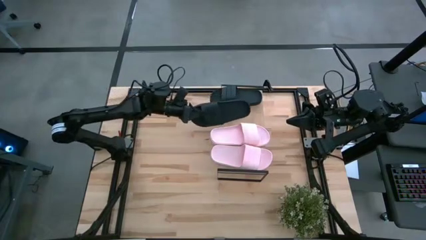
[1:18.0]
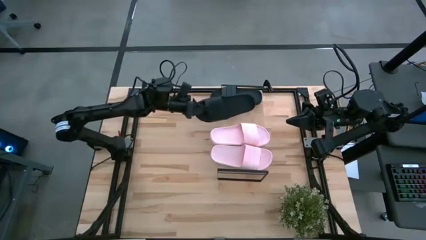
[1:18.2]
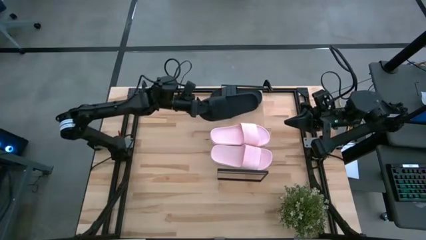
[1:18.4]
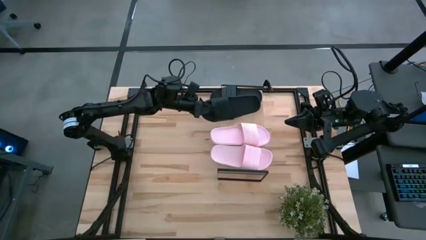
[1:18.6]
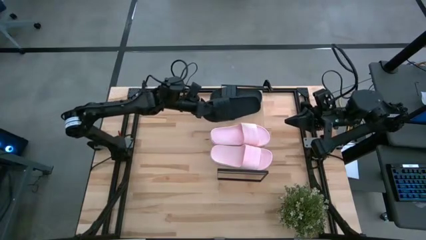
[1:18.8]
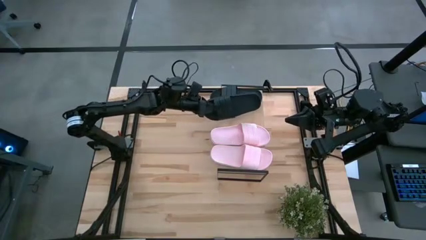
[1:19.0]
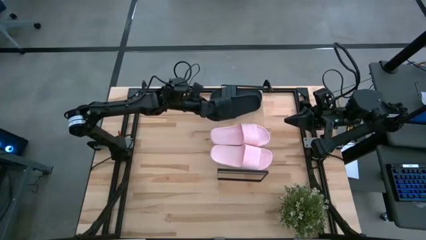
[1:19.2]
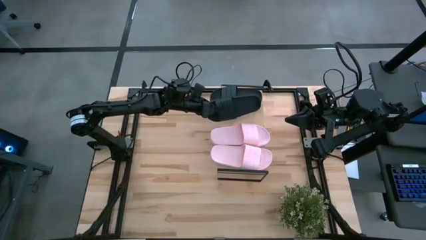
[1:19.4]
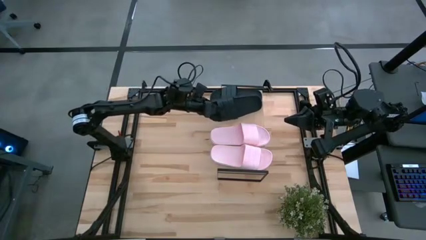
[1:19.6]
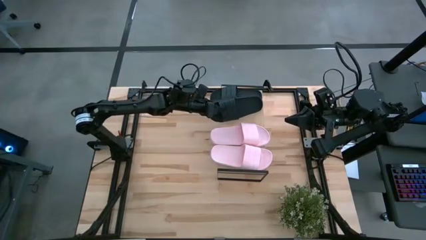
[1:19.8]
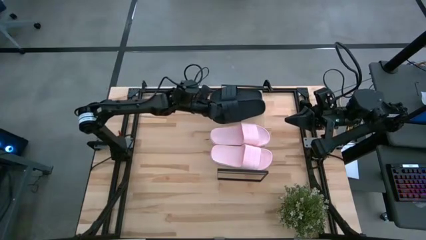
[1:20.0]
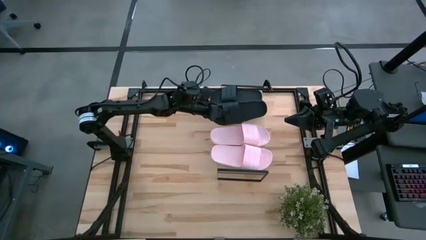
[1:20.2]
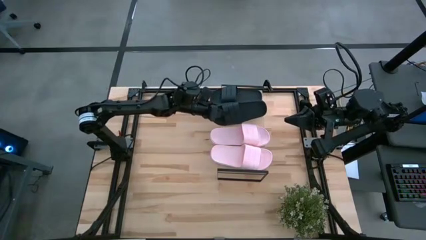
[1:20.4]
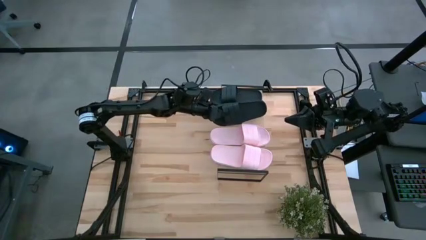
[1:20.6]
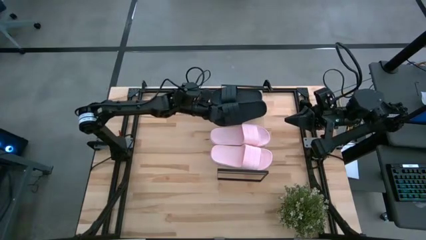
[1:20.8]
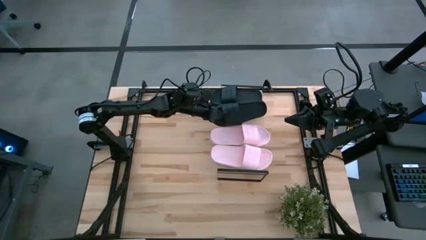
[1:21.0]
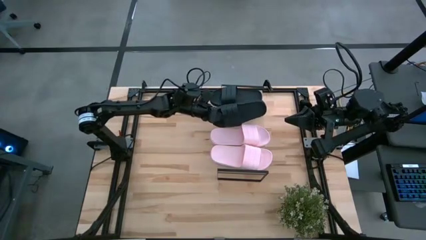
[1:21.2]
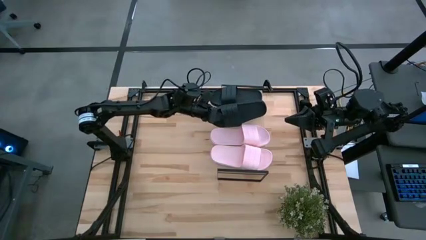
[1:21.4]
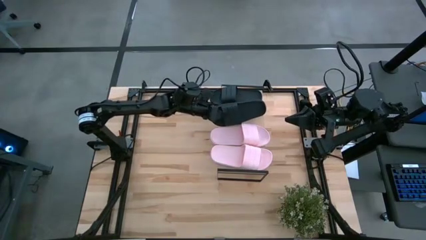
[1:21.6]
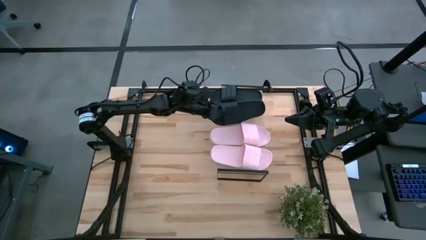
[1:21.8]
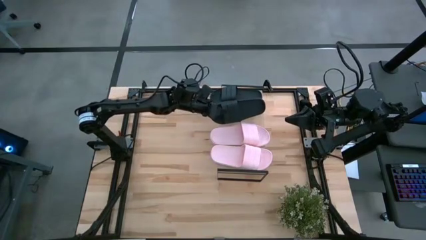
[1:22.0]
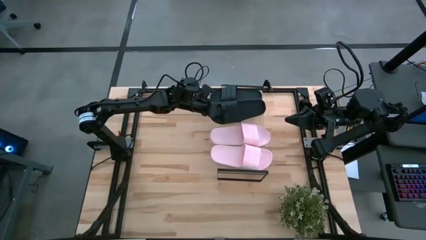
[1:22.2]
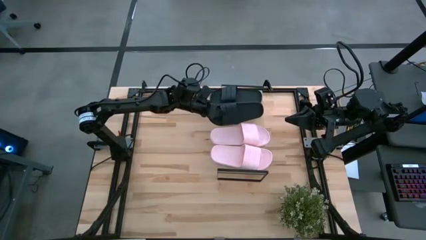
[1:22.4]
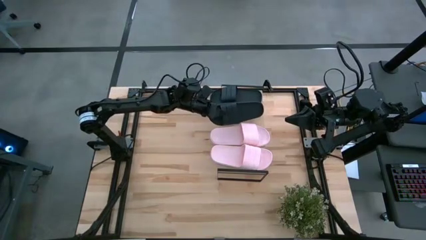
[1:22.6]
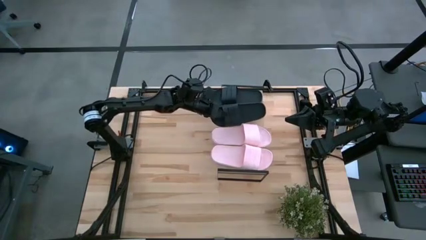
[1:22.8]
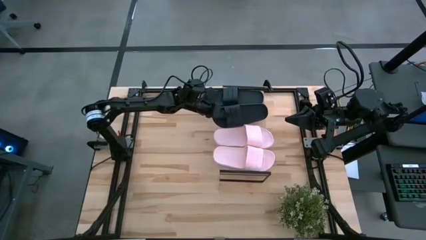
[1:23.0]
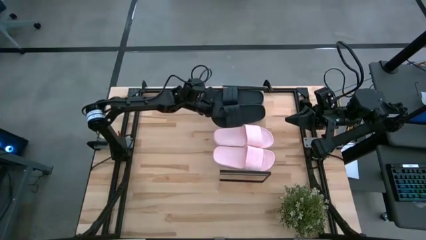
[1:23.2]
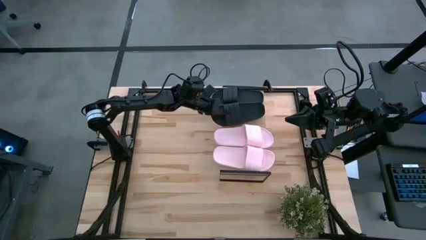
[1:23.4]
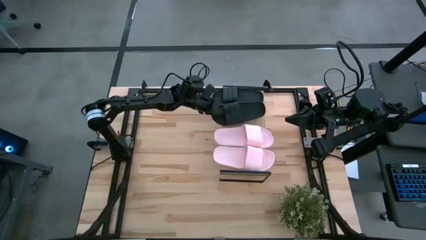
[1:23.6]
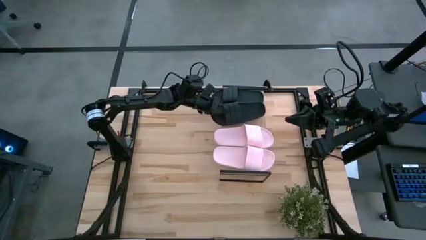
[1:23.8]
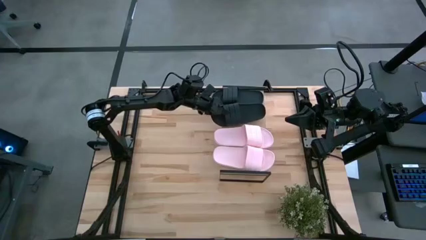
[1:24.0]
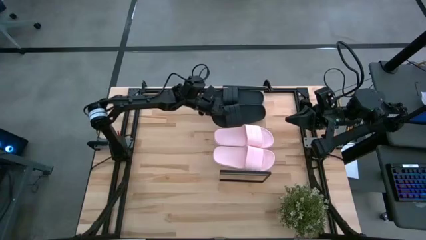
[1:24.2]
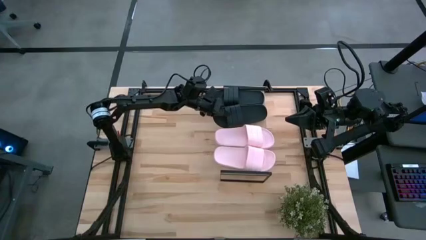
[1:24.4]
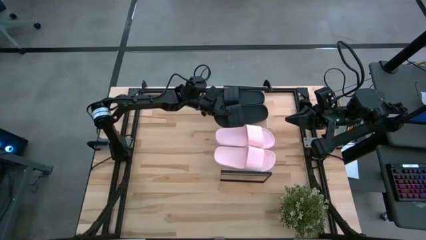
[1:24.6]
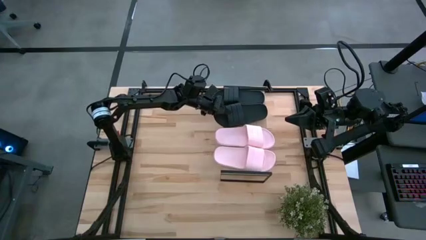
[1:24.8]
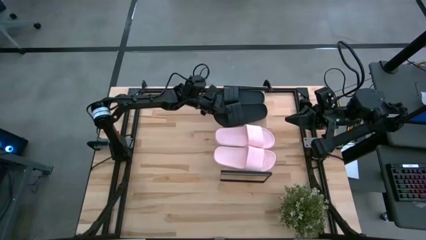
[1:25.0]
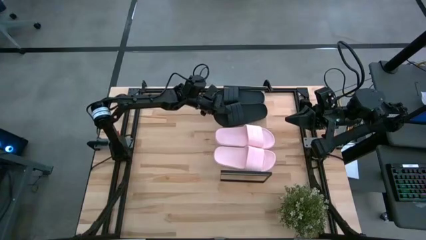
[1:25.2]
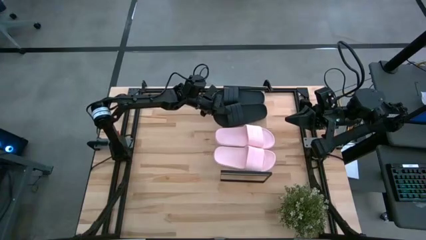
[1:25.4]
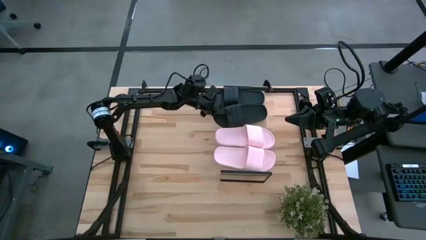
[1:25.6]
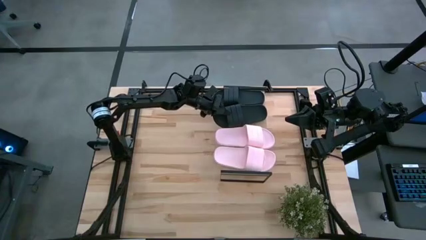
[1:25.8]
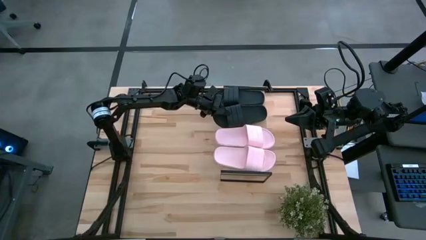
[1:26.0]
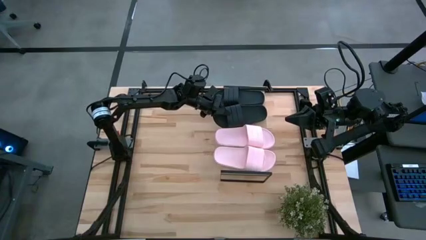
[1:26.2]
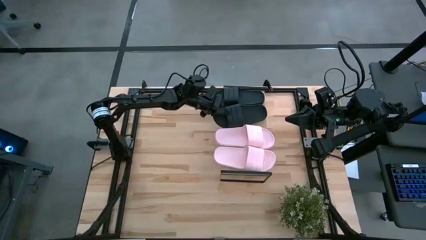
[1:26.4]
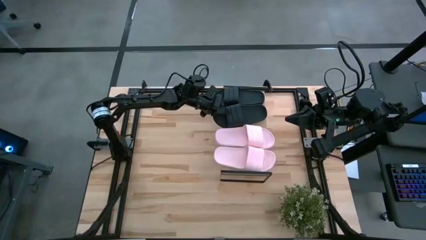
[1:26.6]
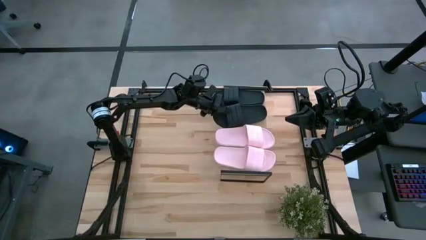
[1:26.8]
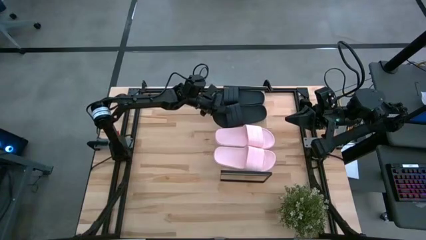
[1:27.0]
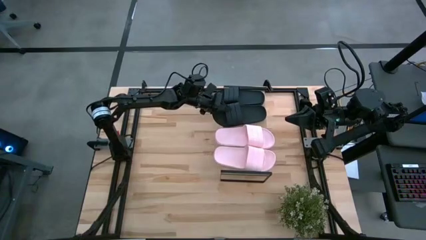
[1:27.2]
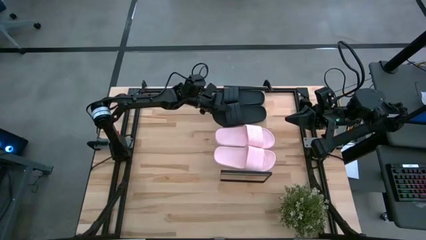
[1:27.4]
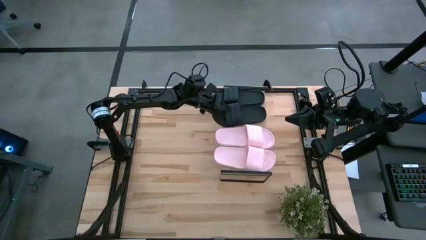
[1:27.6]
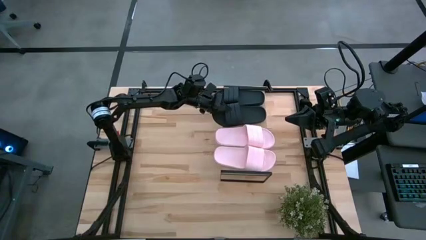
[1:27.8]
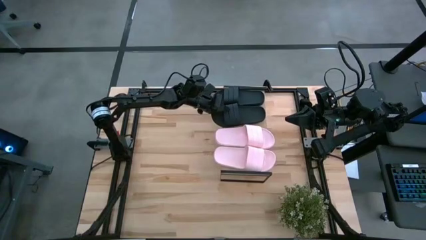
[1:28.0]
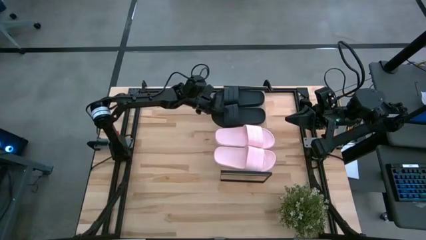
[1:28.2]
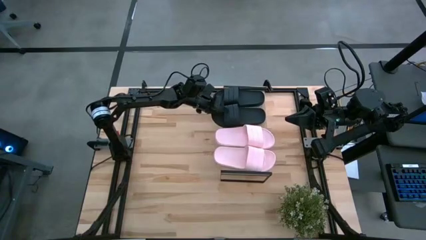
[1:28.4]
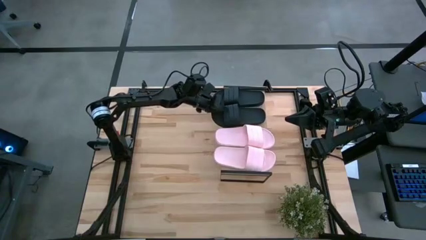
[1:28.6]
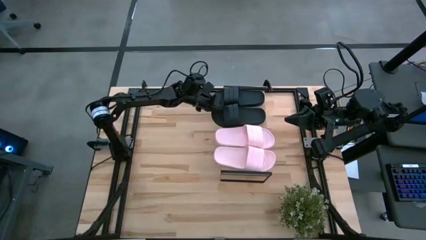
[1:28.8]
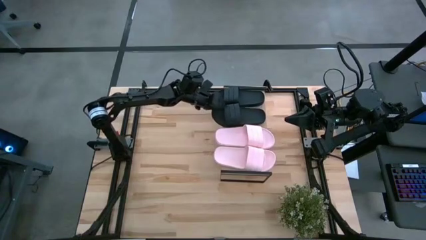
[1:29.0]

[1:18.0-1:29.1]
Task: Pick and place slides into the shelf
Put the black slipper on the shelf
